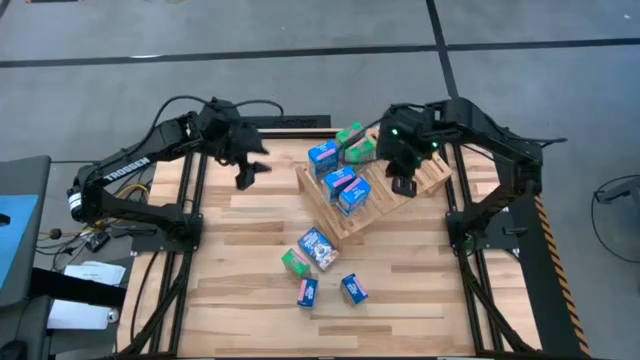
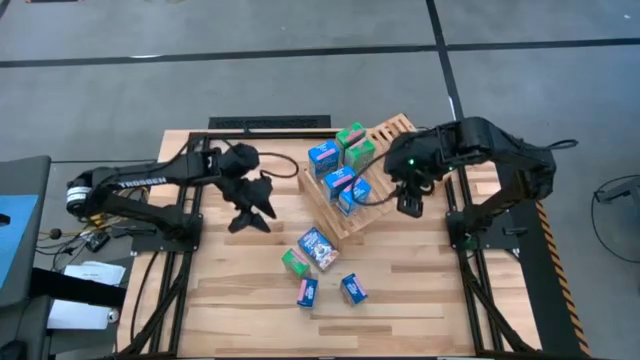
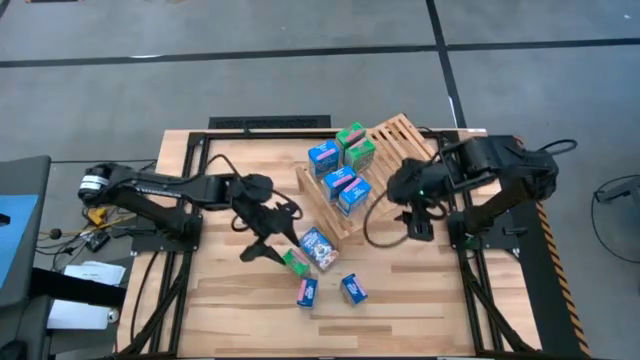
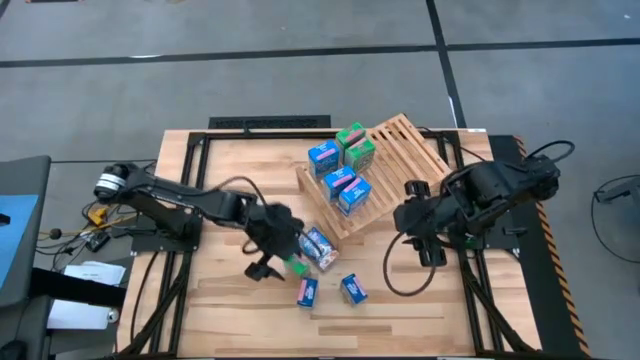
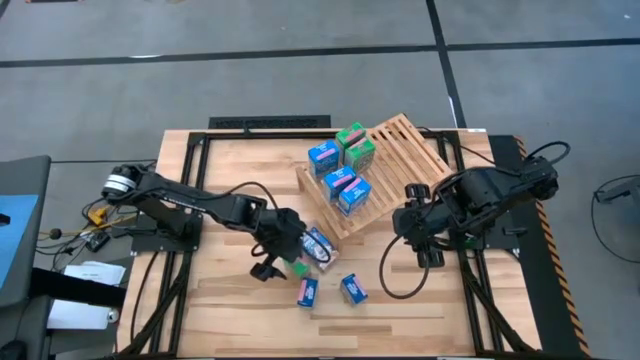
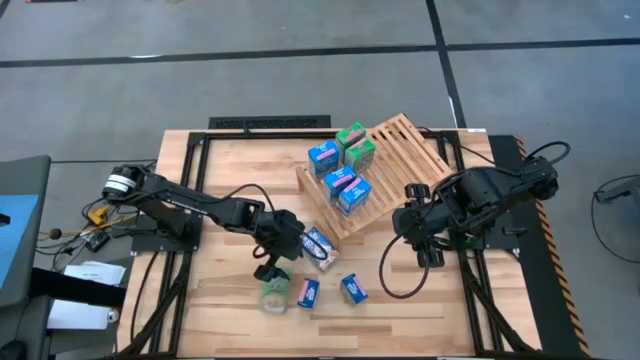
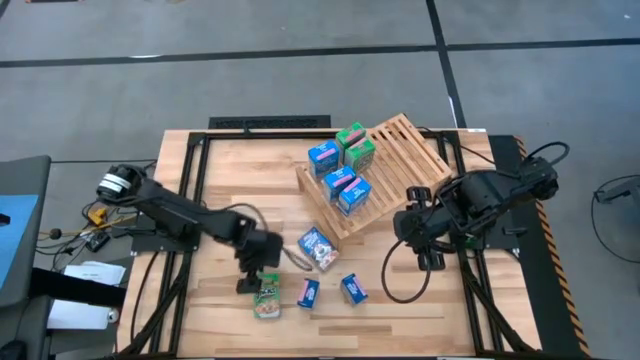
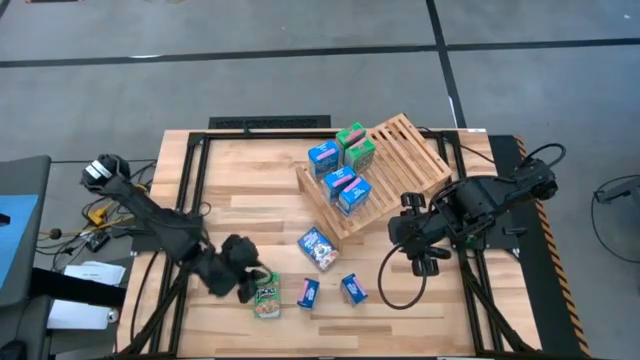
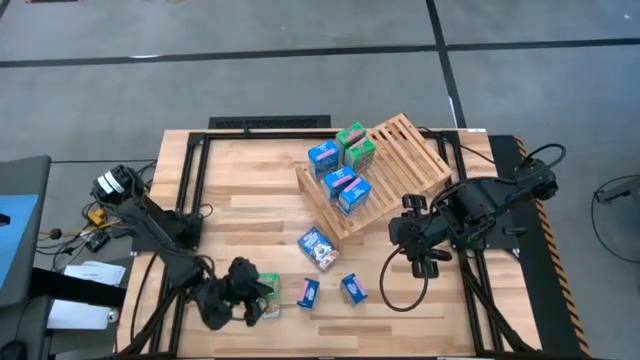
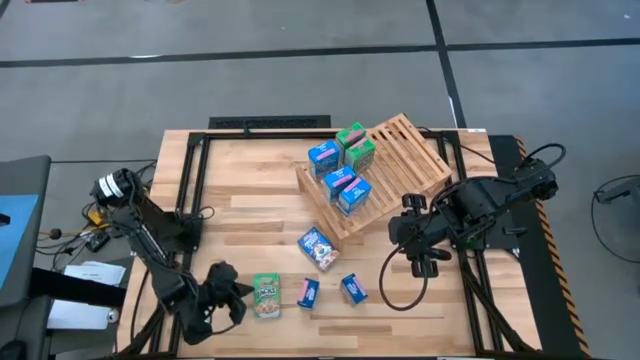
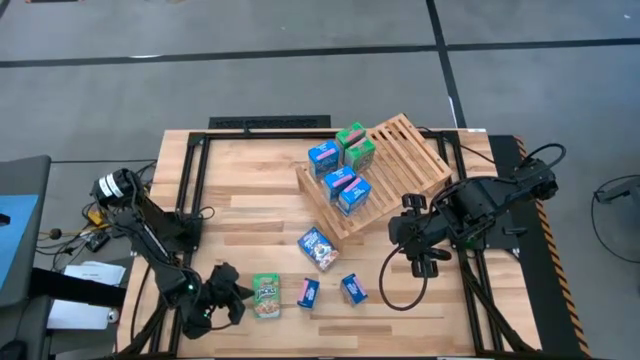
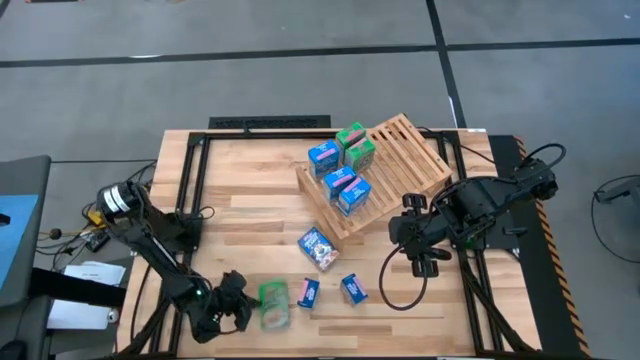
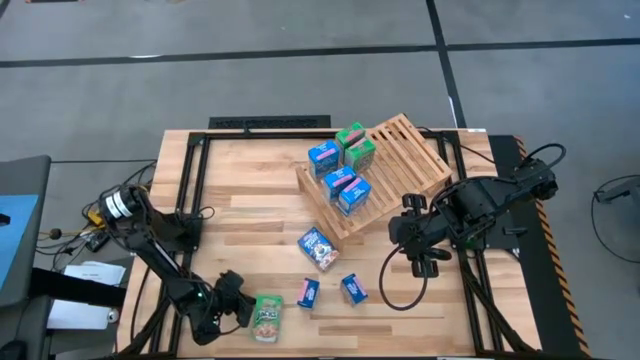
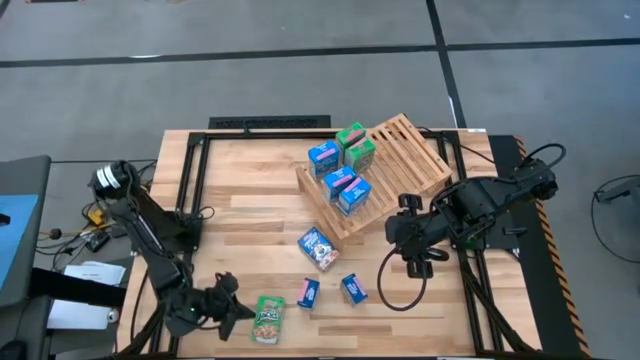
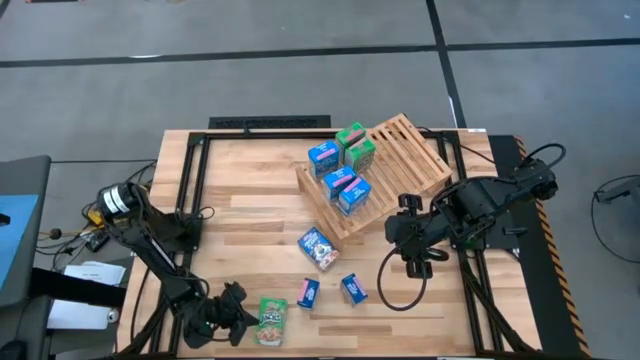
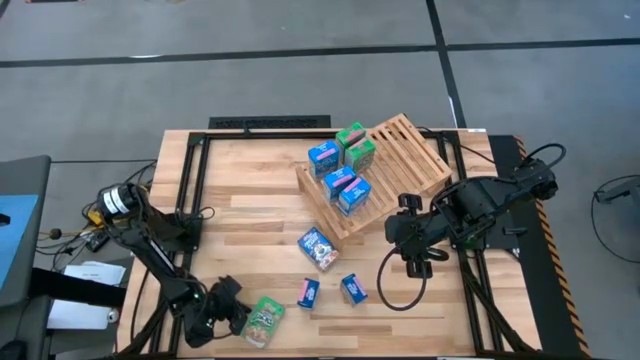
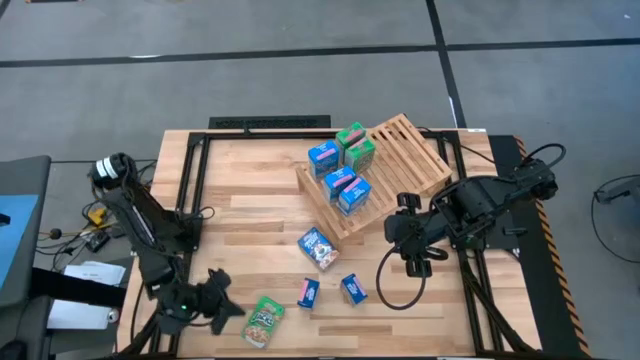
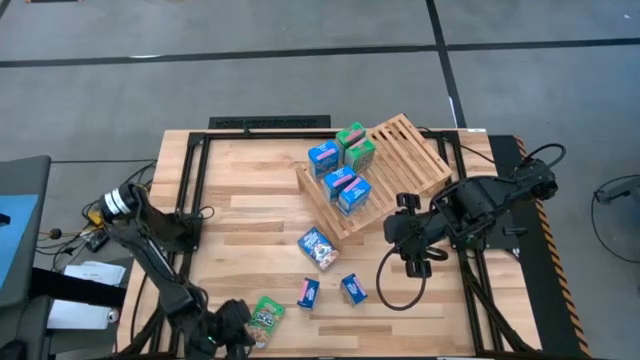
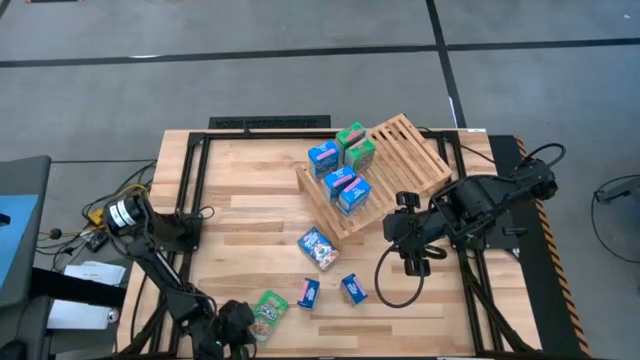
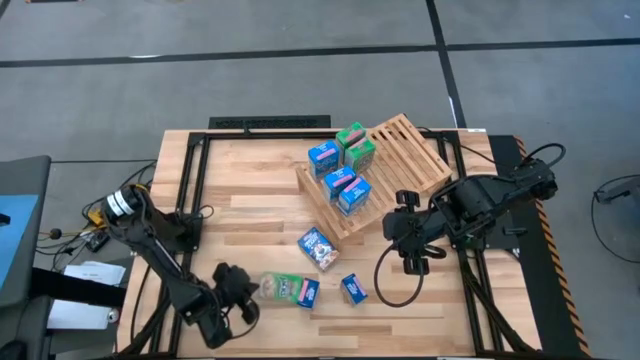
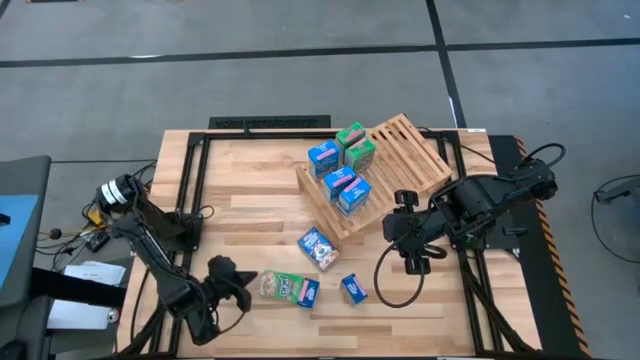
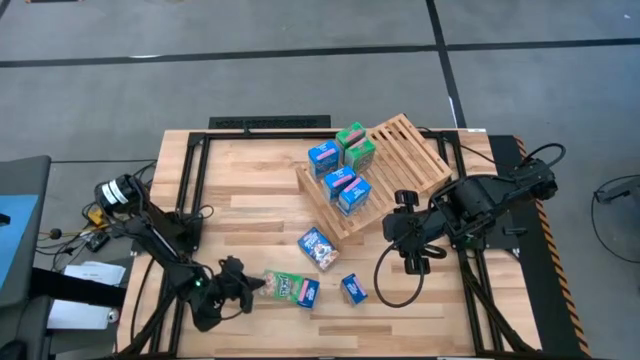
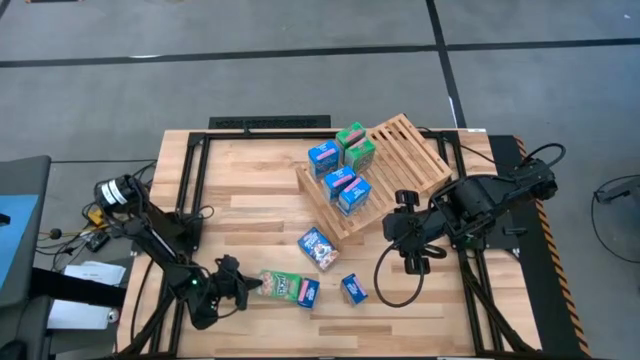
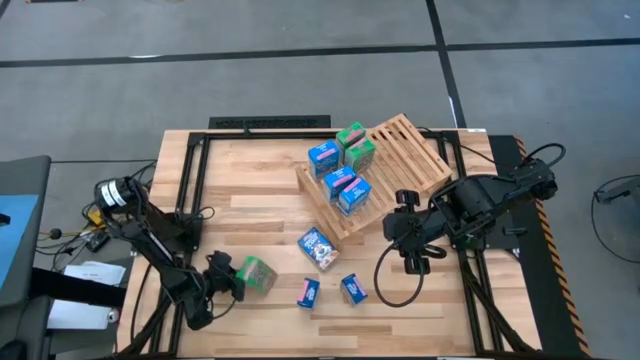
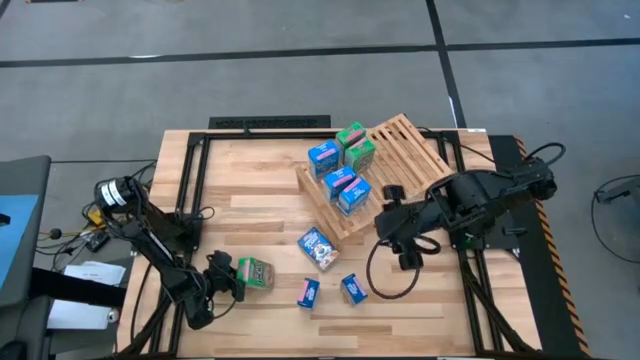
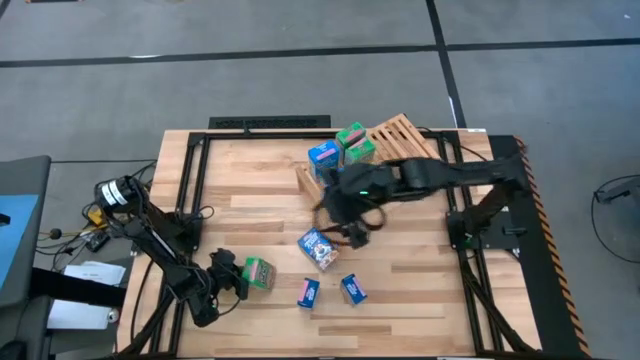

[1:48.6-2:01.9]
Task: Stack cereal on shelf
Put the green cereal box aligned with the other green cereal boxes on the shelf

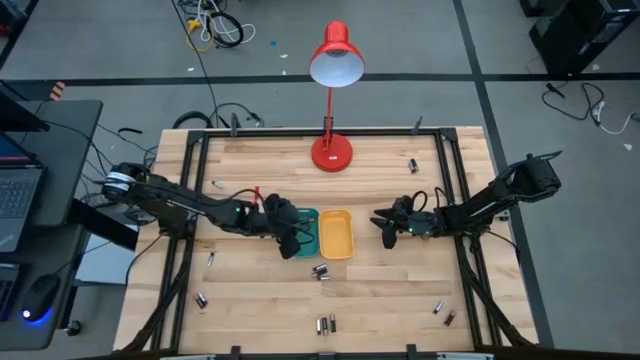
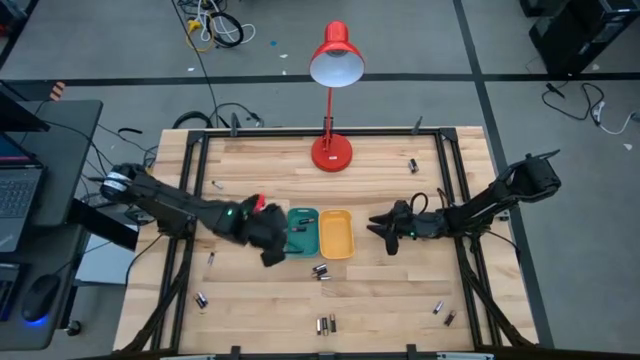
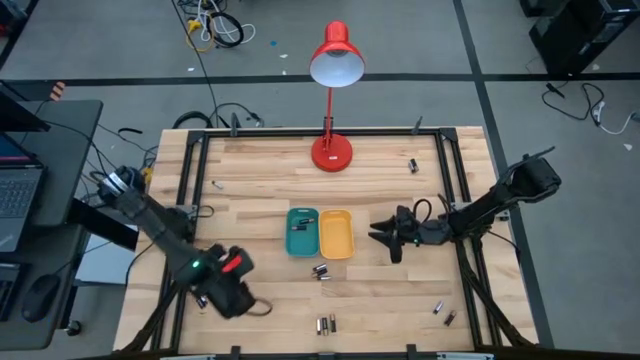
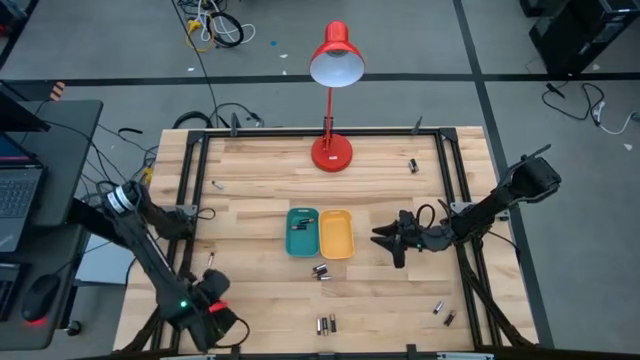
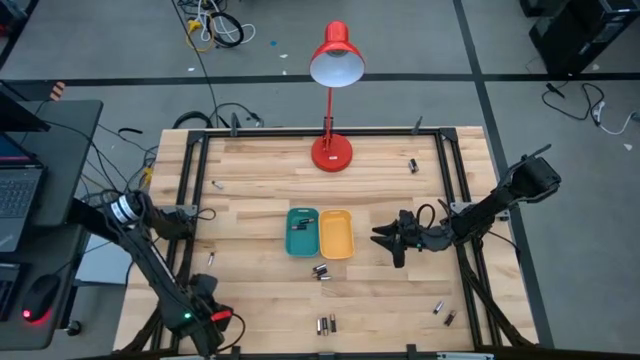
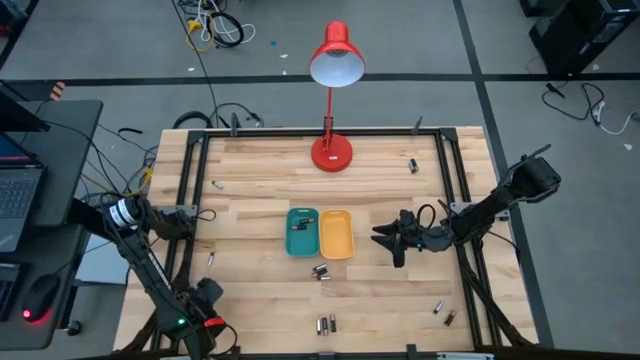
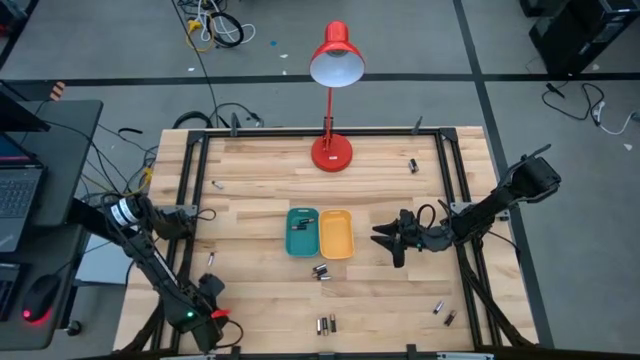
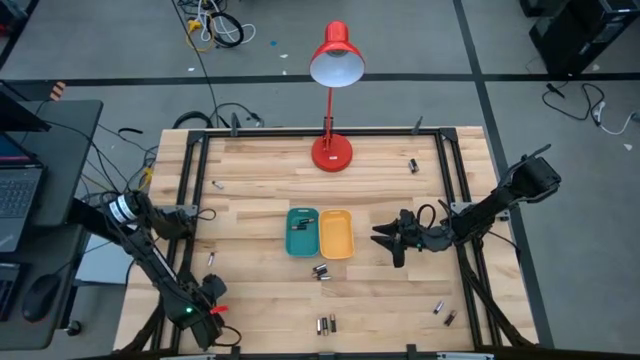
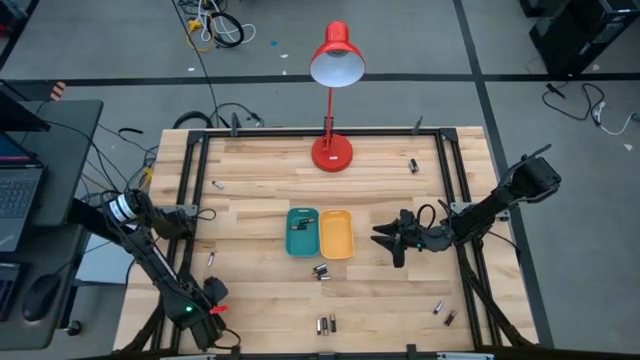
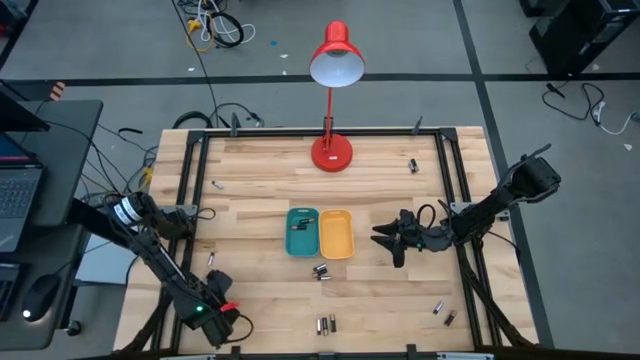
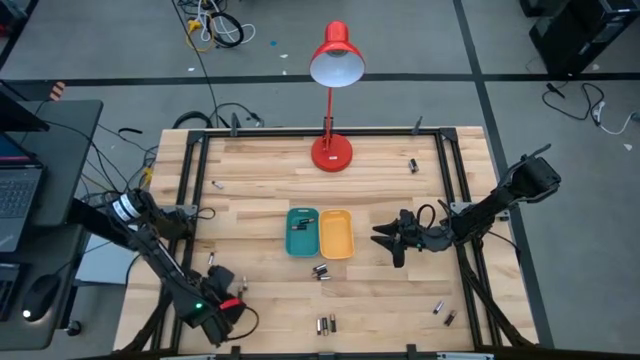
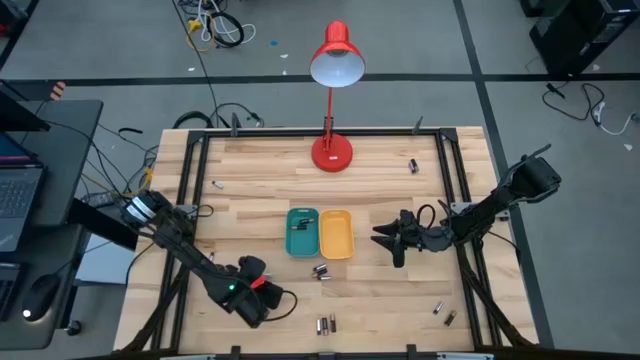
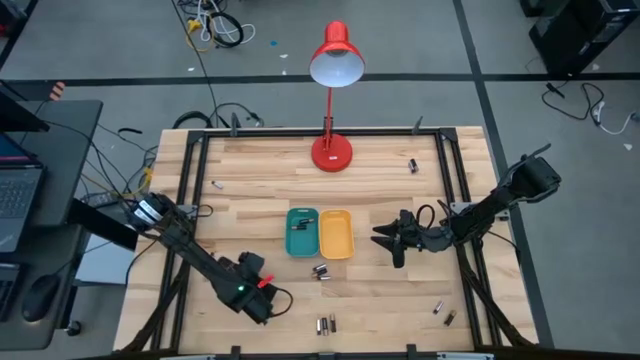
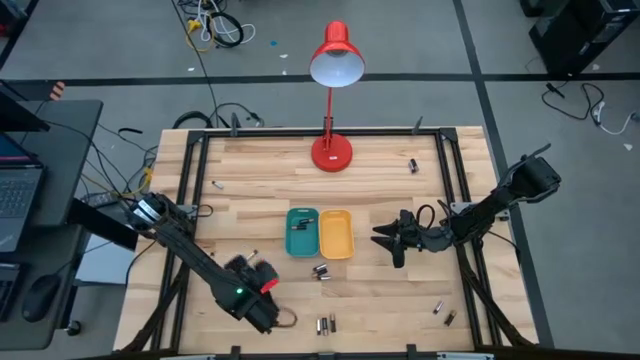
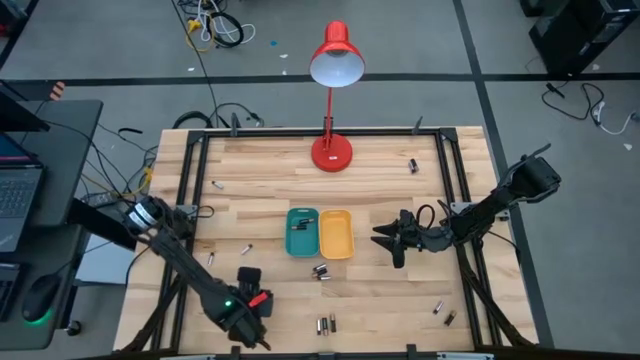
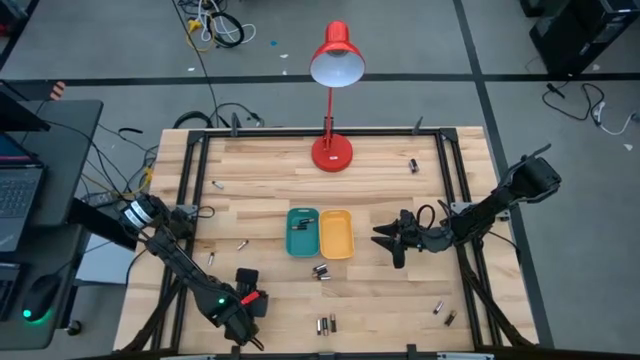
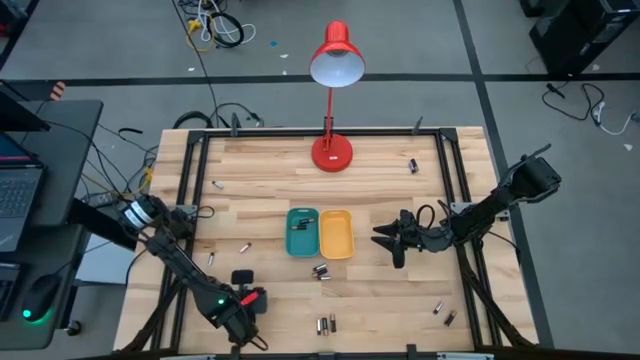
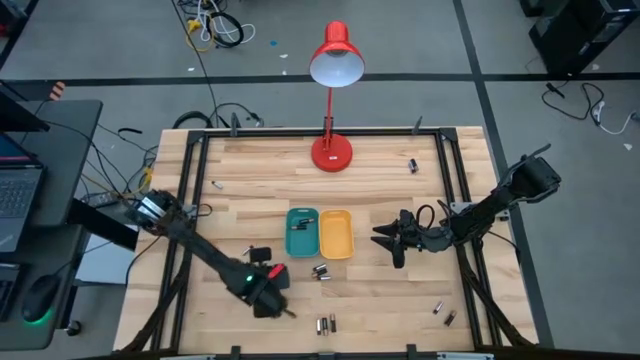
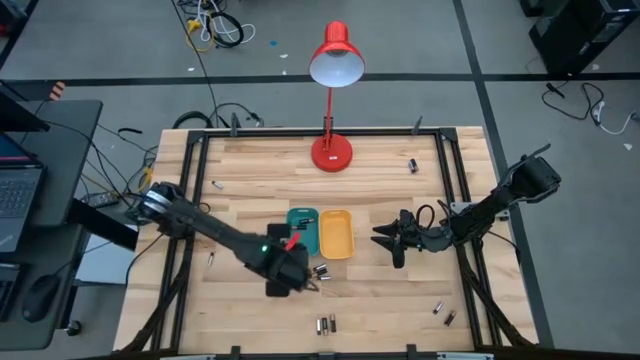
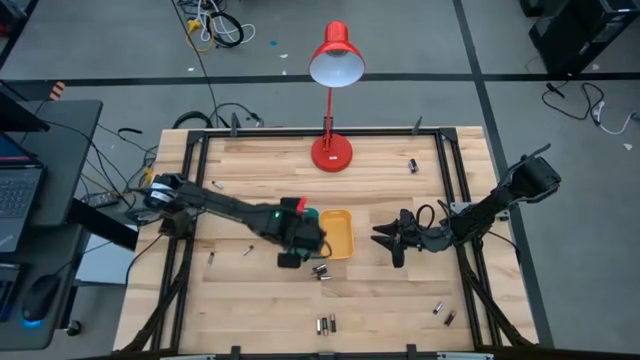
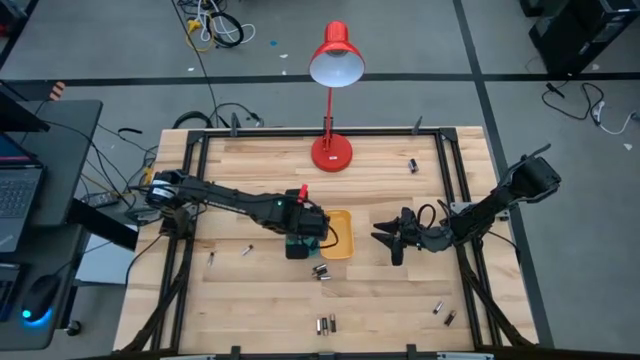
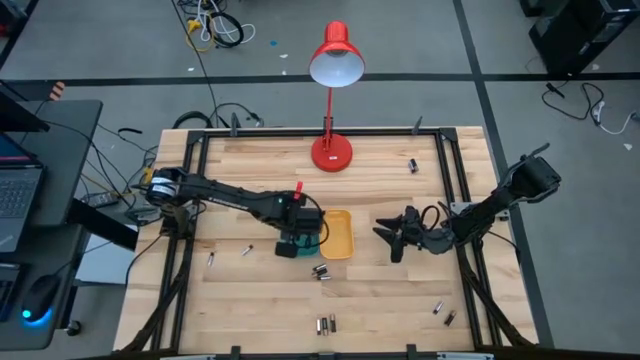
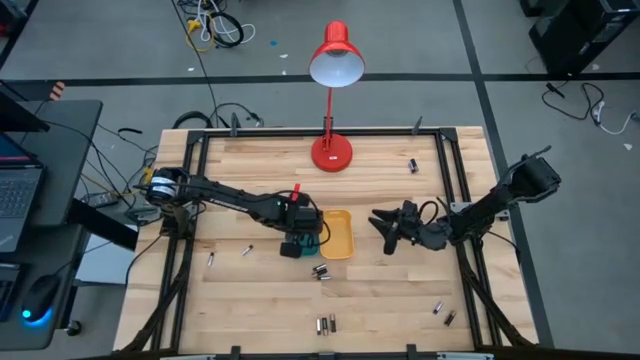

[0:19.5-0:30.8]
Task: Sort batteries
Put the black battery into the blue bin
